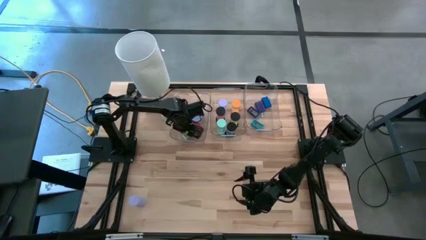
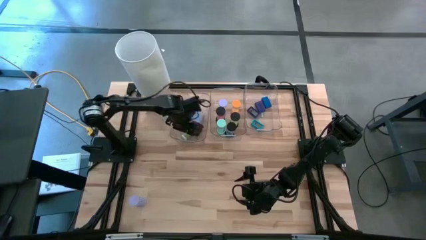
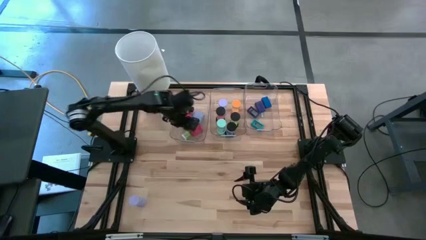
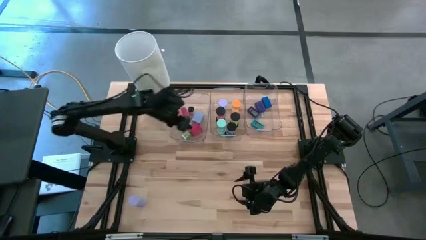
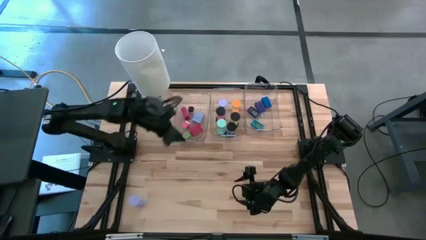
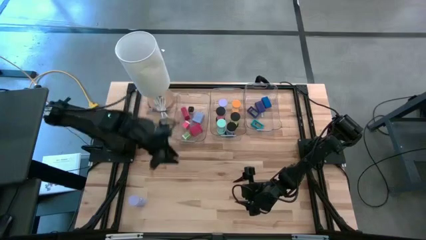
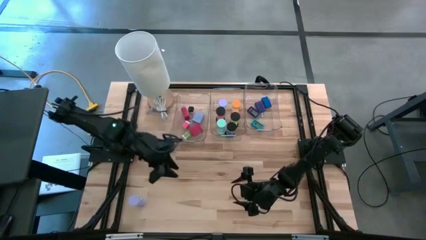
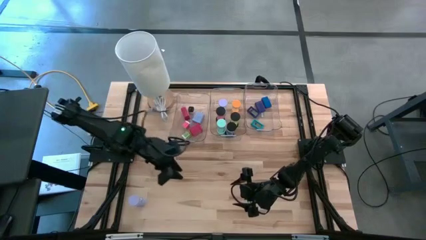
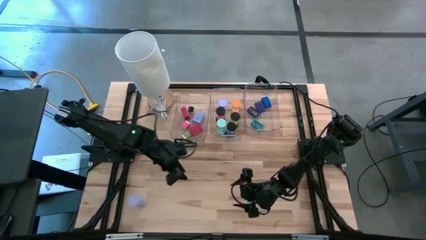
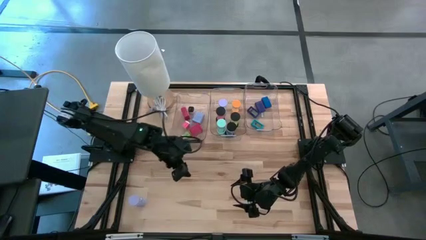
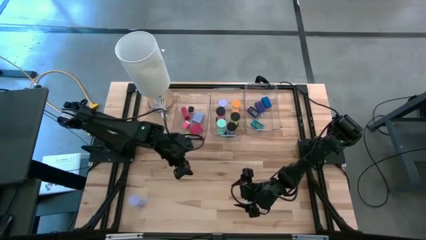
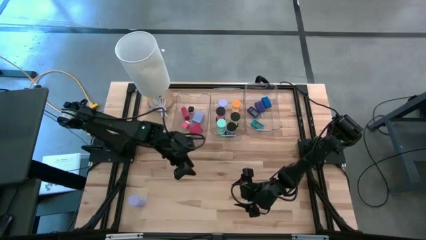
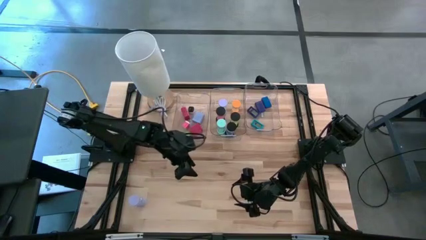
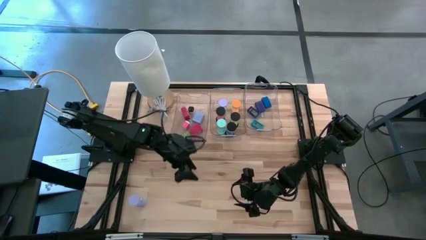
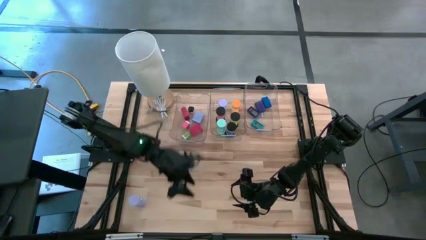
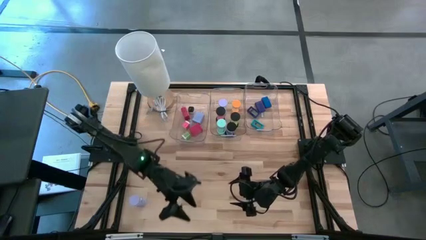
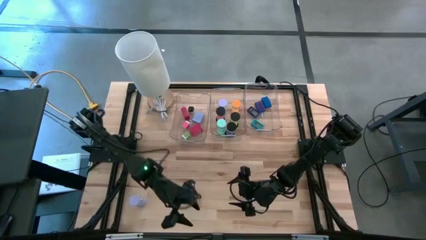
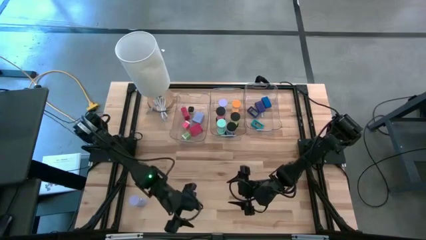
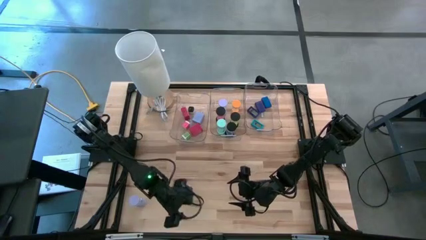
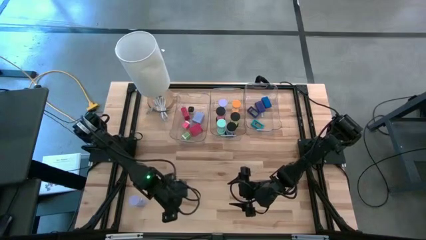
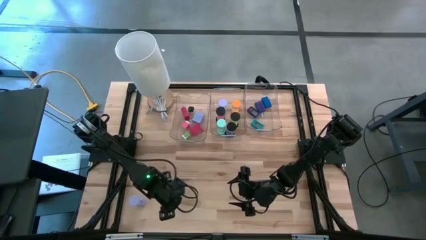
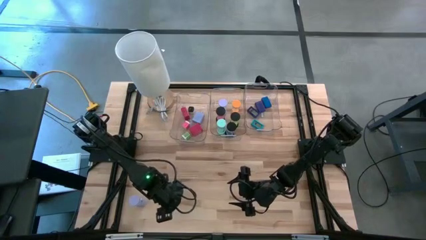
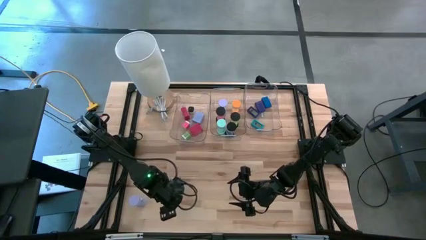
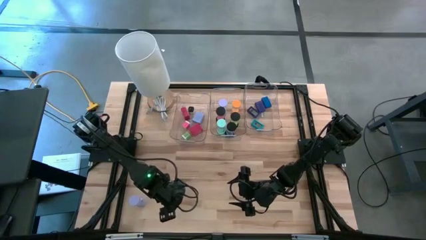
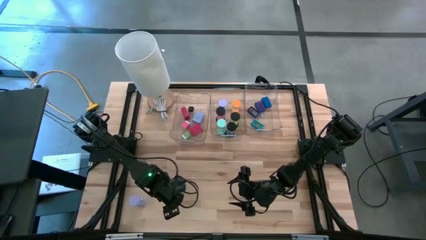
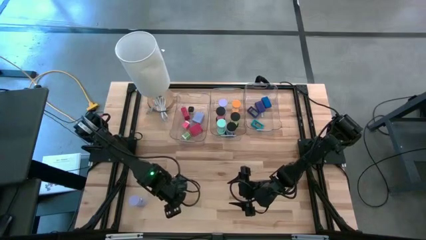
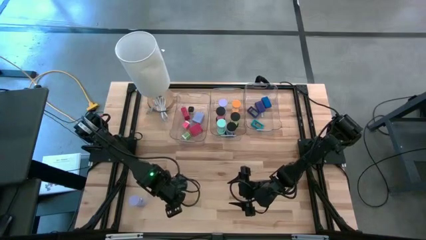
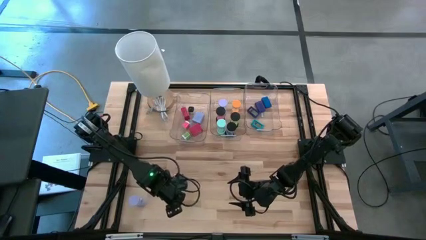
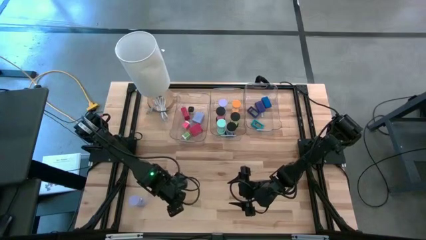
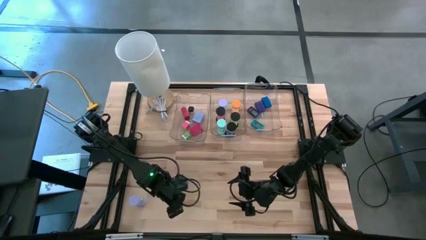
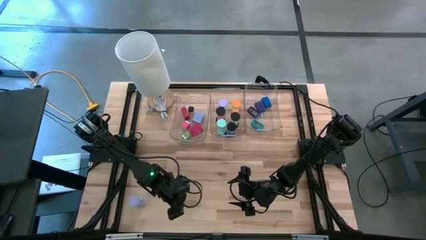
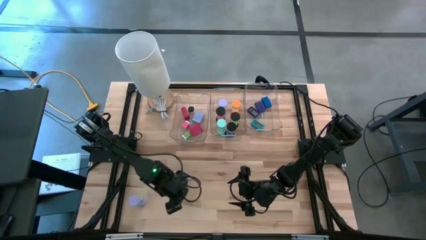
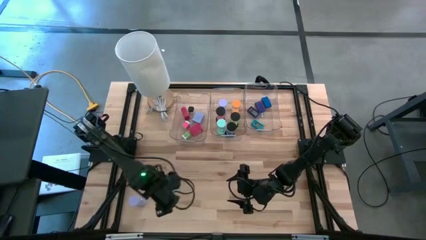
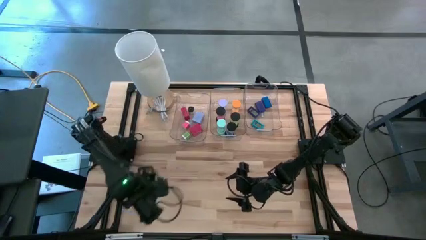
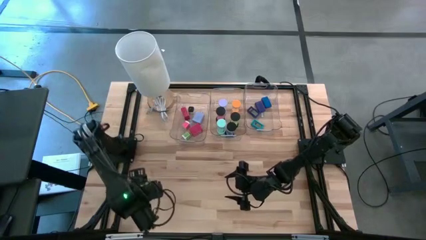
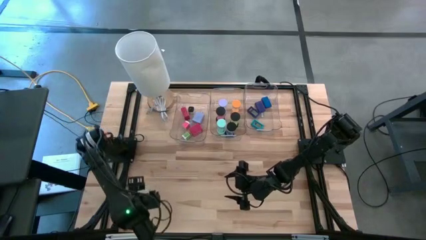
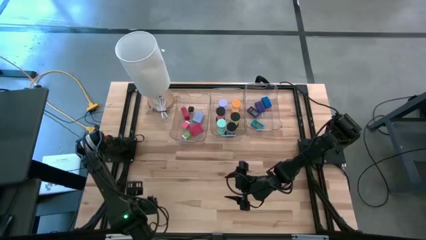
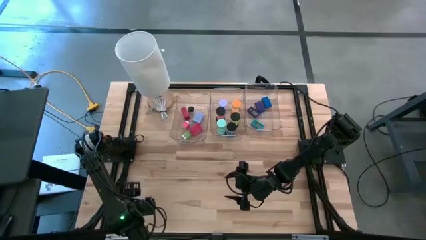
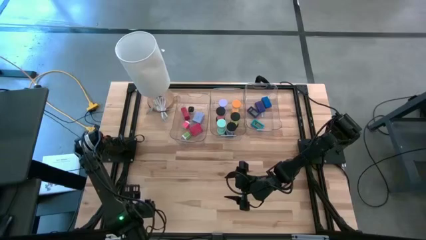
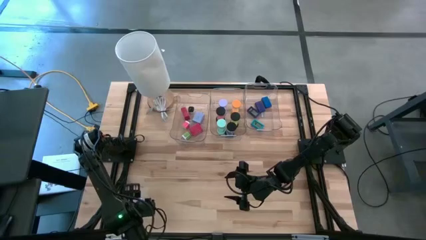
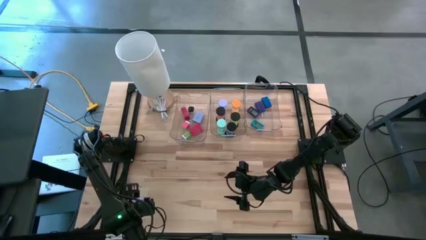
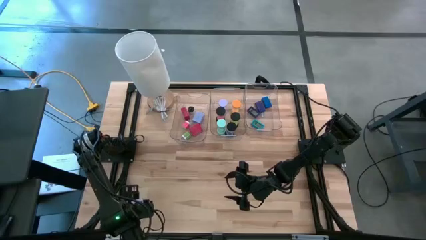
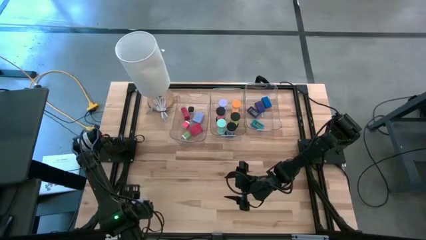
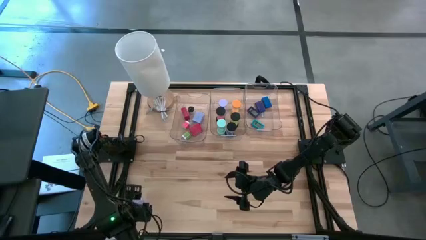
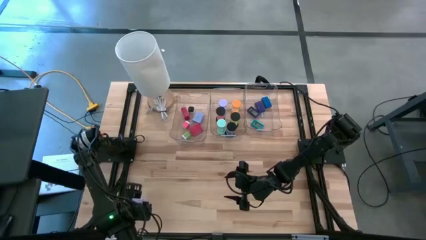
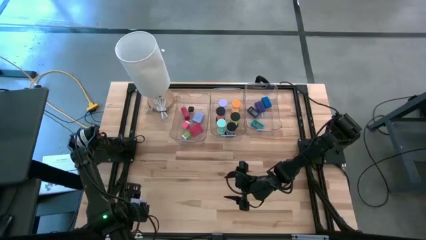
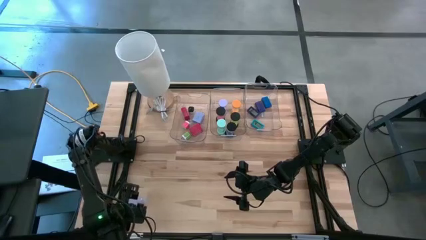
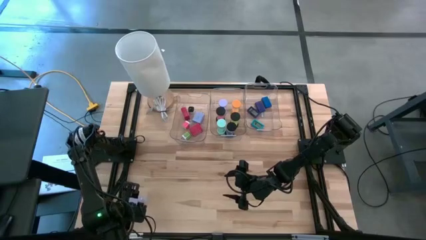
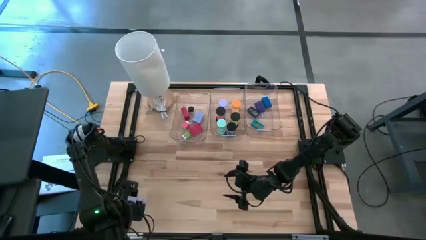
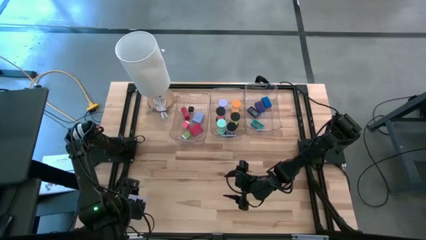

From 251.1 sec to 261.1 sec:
Task: Pick & Place Office items
Put the violet hourglass into the middle transparent bin
